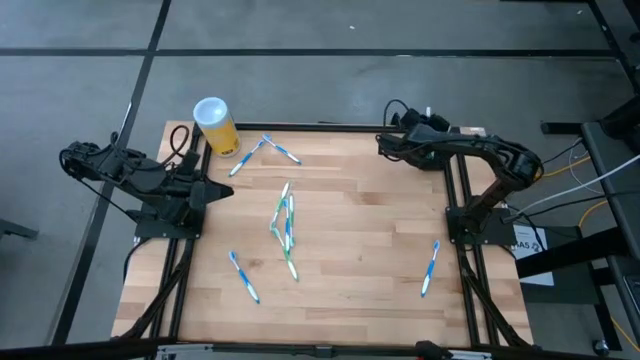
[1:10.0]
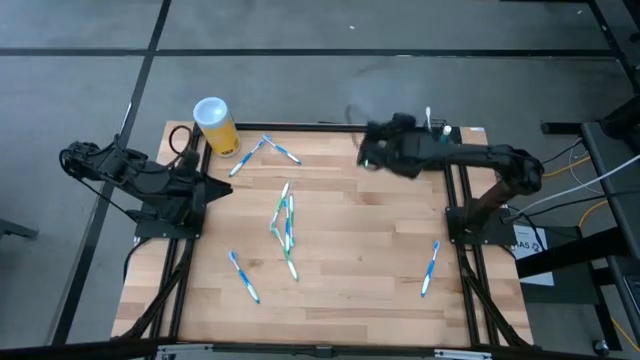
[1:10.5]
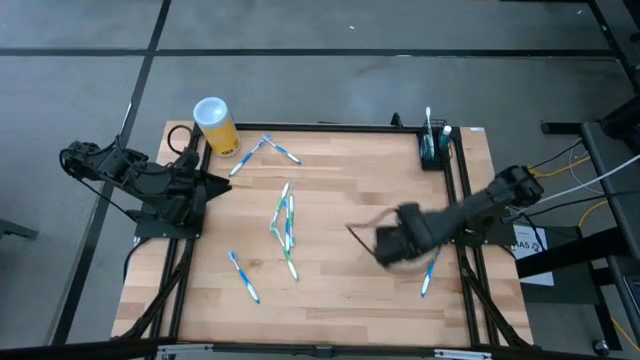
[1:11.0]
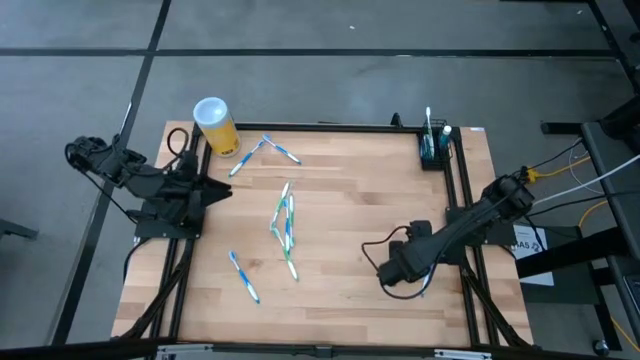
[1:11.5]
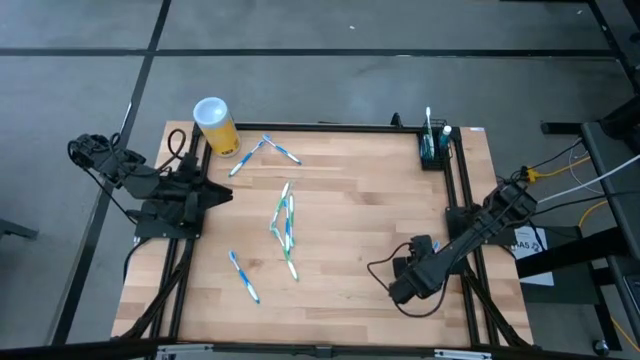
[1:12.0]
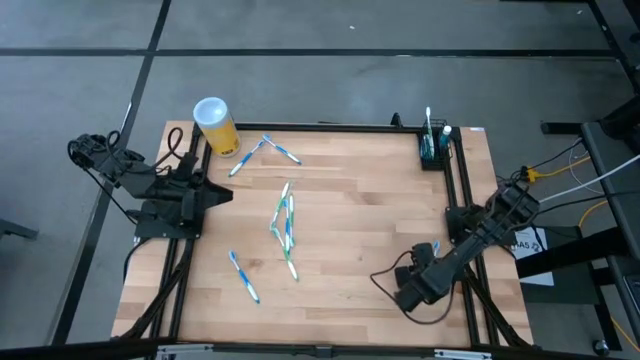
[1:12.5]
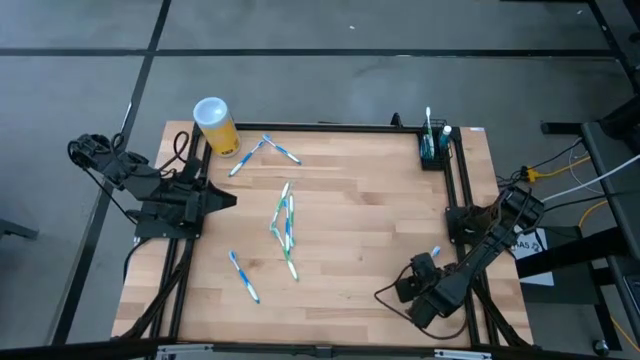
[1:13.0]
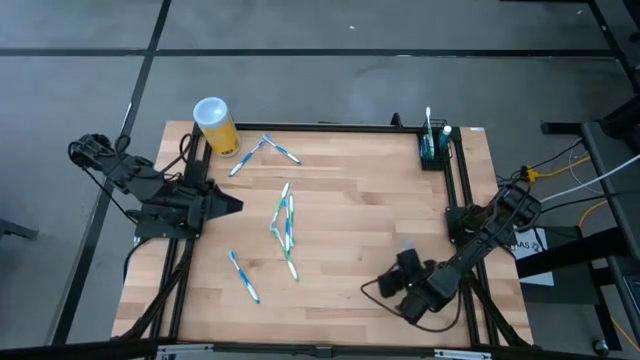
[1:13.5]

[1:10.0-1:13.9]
Task: Pick & Place toothbrushing station
Put the blue toothbrush into the mesh organizer

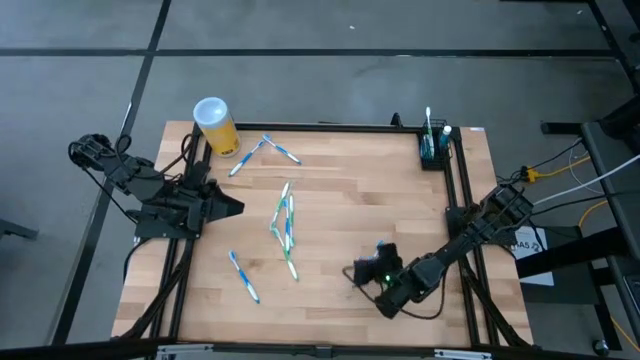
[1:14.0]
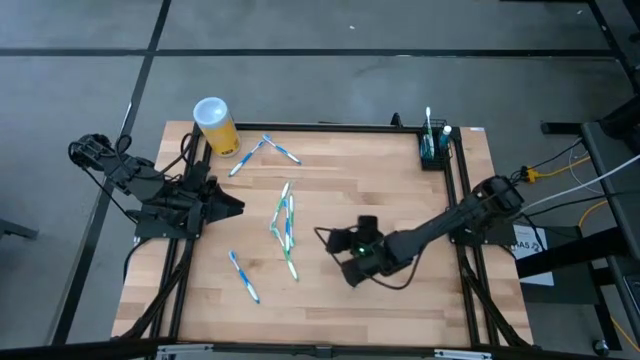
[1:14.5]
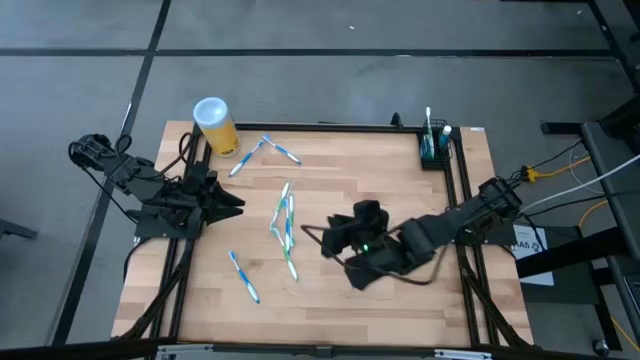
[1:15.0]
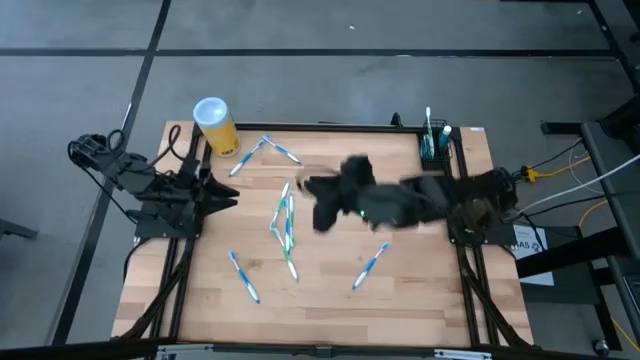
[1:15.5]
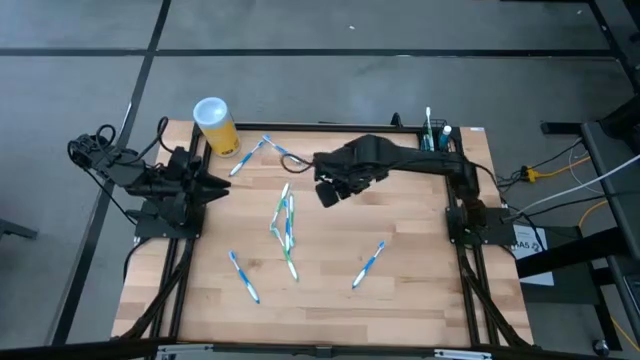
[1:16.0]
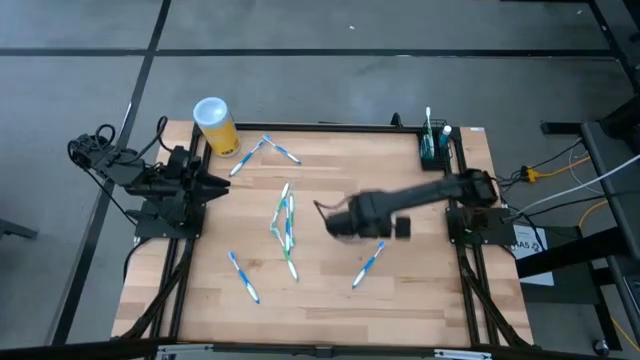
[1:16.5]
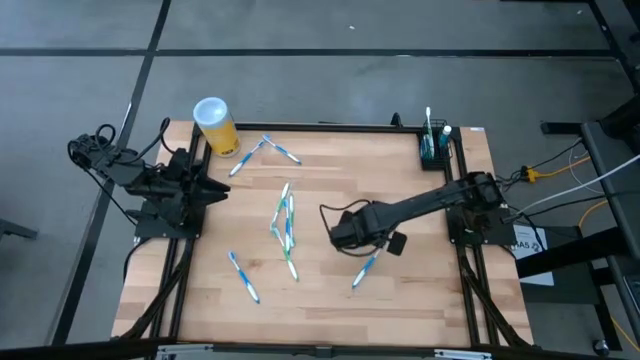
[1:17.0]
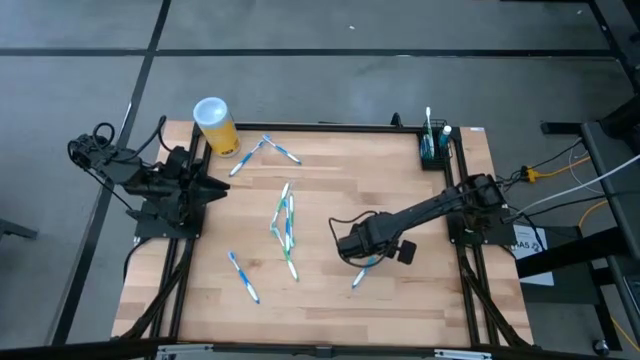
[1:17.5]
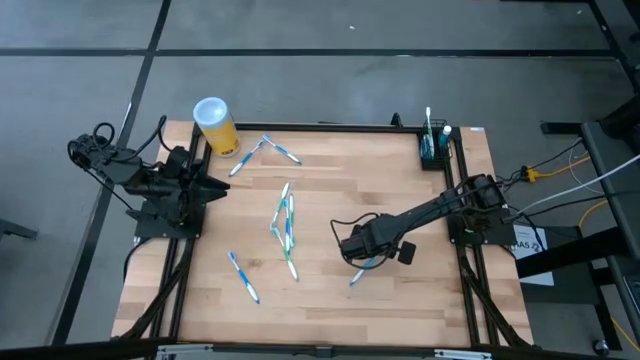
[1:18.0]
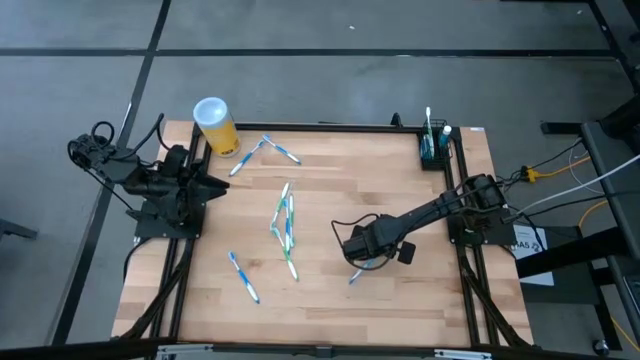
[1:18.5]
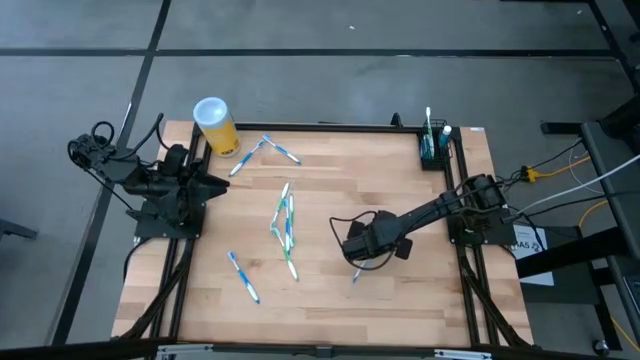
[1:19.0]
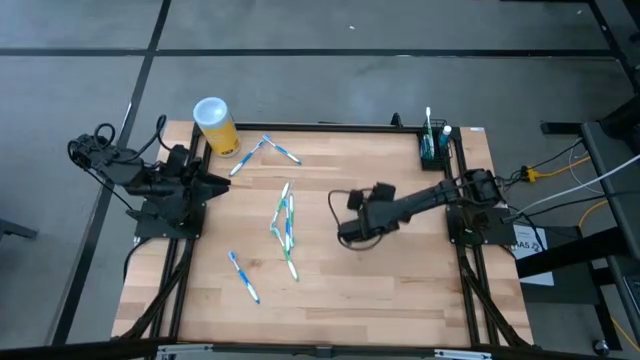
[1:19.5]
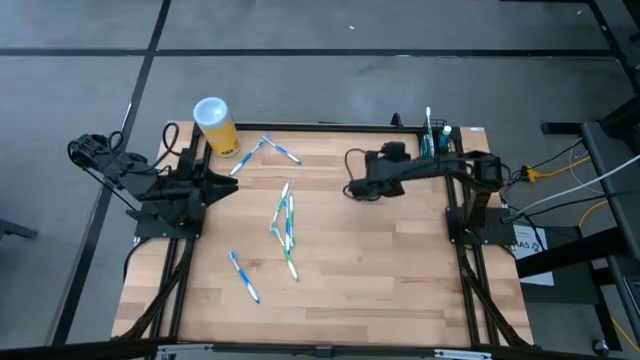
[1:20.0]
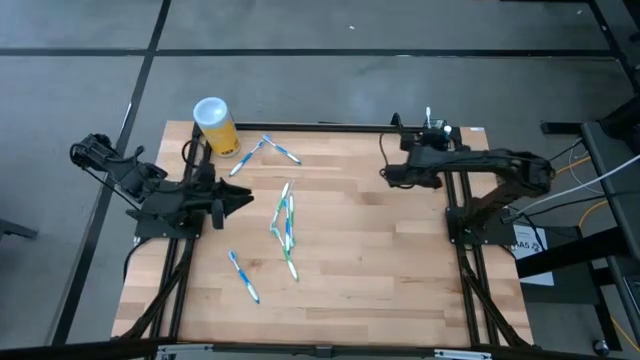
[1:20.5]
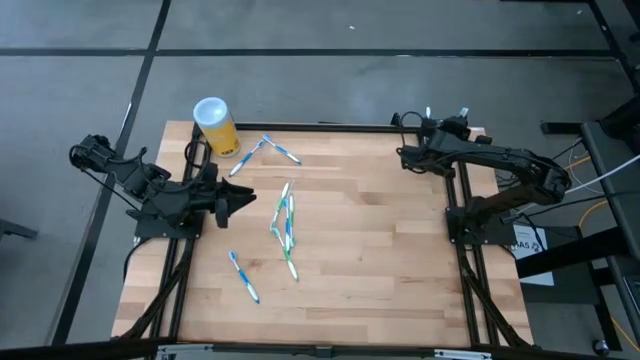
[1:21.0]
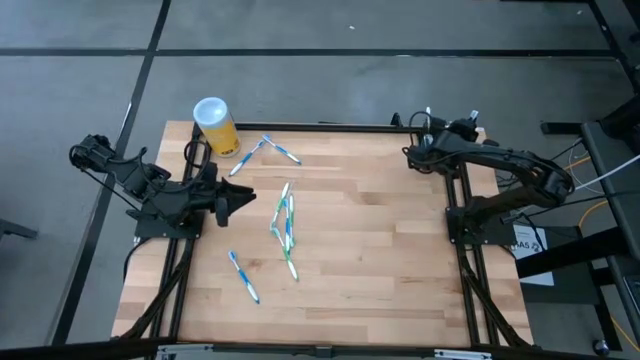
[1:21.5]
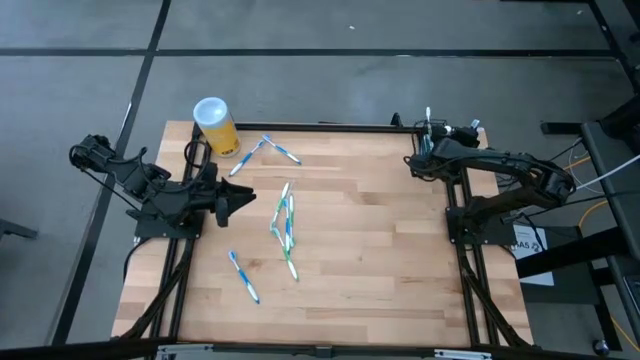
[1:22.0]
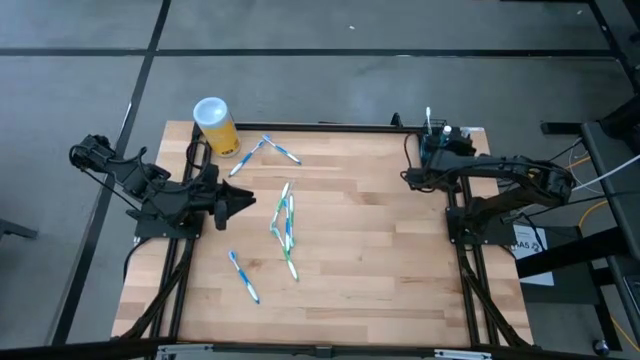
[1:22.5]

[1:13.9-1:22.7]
Put the blue toothbrush into the mesh organizer

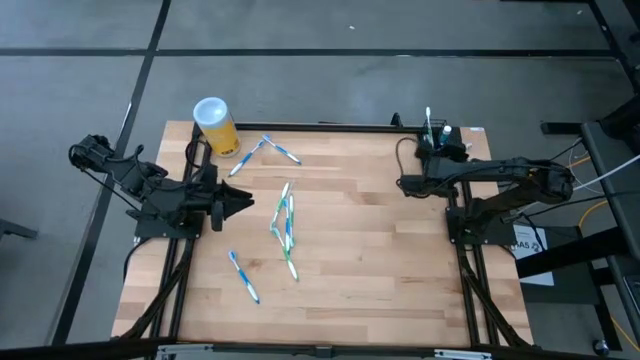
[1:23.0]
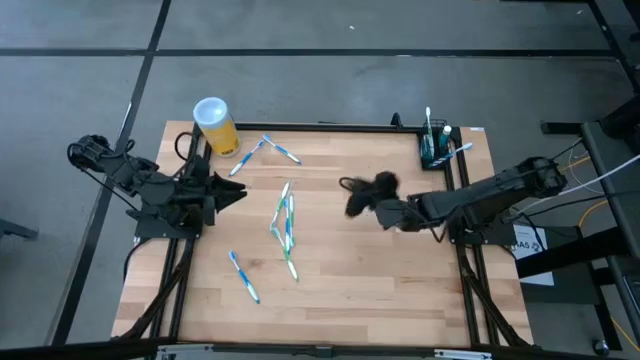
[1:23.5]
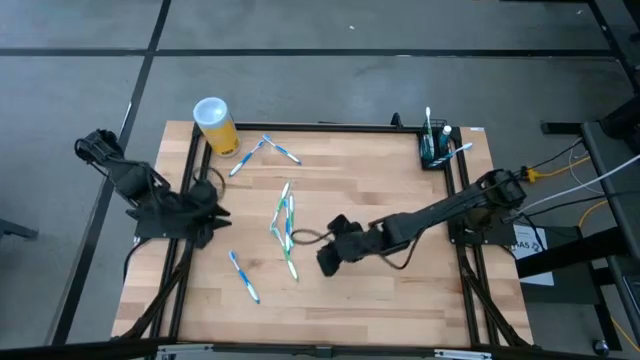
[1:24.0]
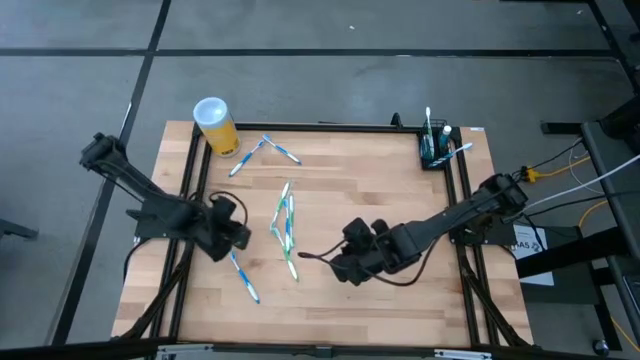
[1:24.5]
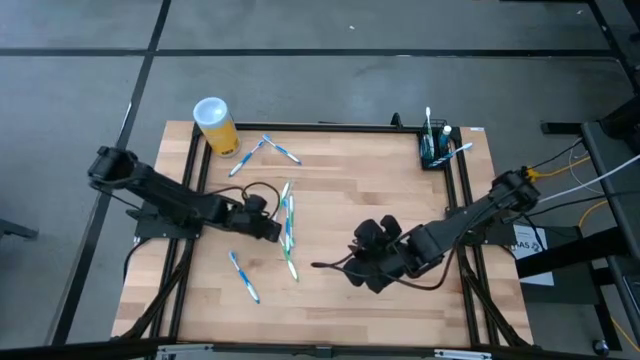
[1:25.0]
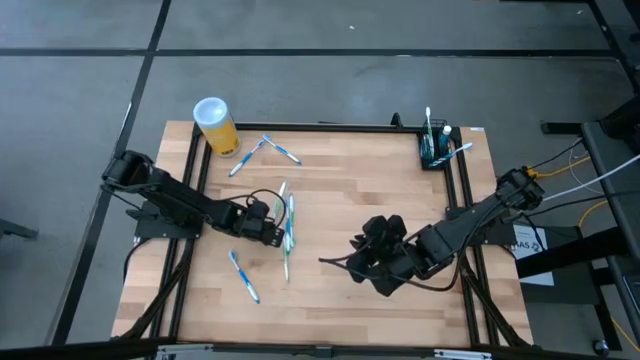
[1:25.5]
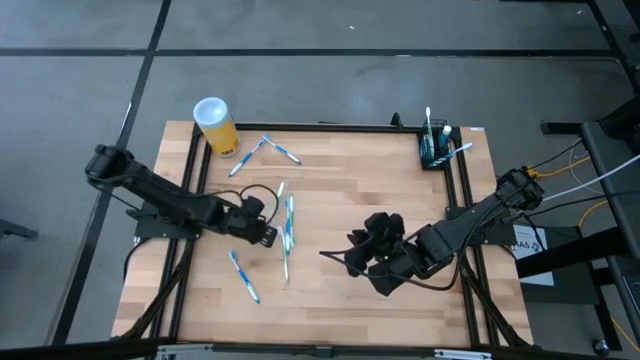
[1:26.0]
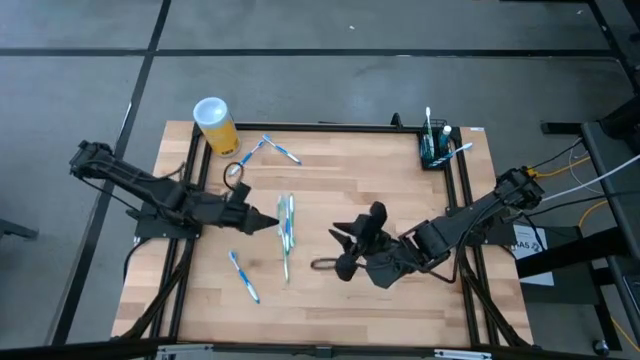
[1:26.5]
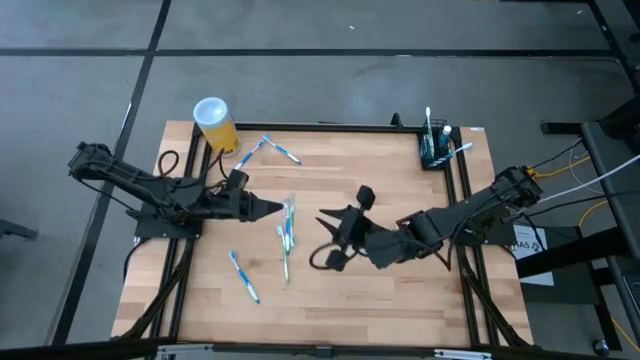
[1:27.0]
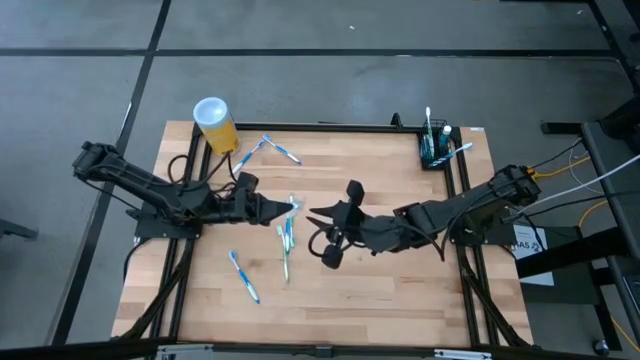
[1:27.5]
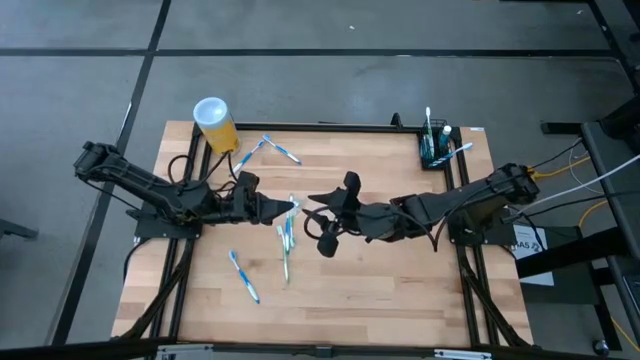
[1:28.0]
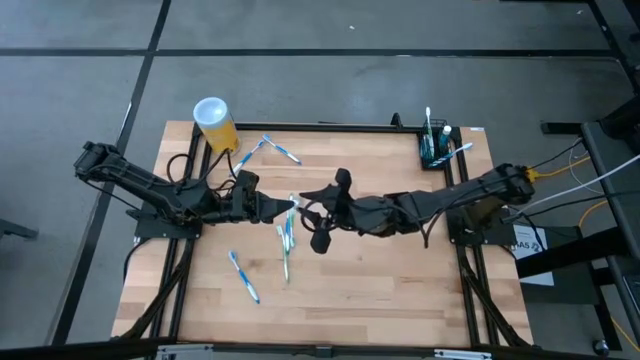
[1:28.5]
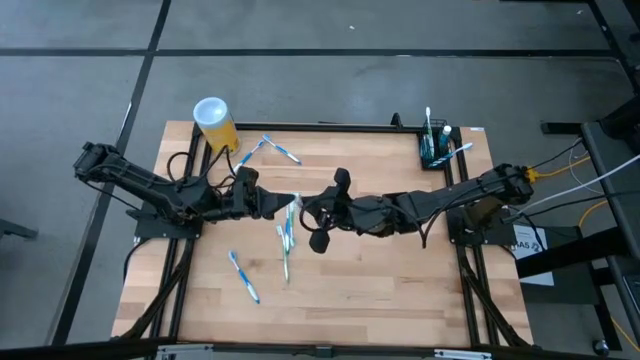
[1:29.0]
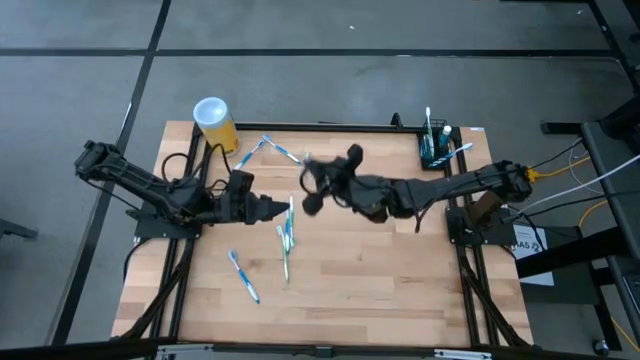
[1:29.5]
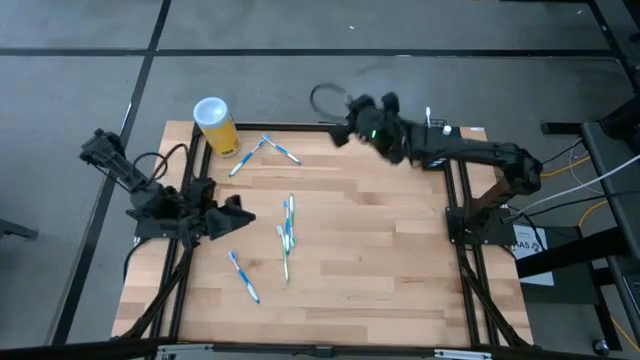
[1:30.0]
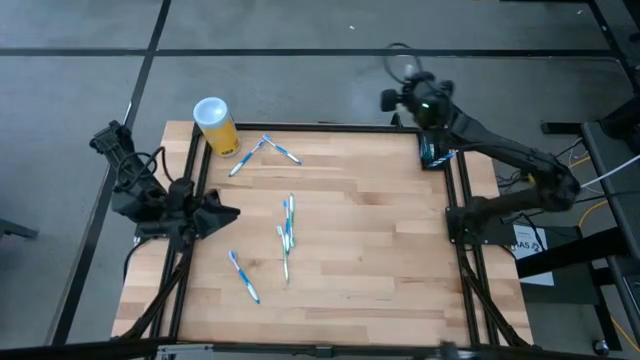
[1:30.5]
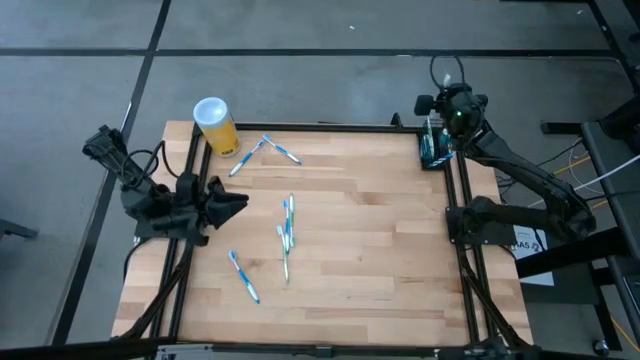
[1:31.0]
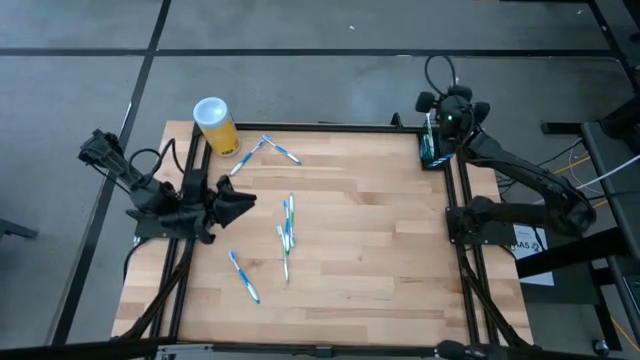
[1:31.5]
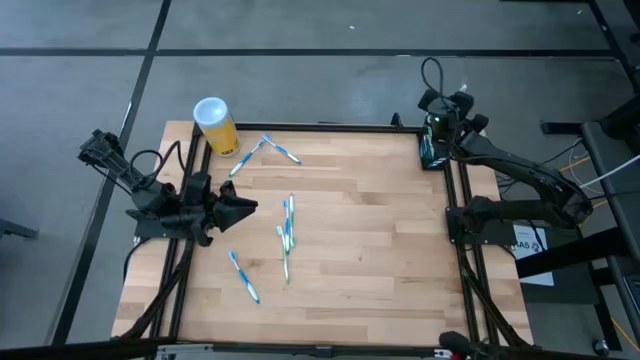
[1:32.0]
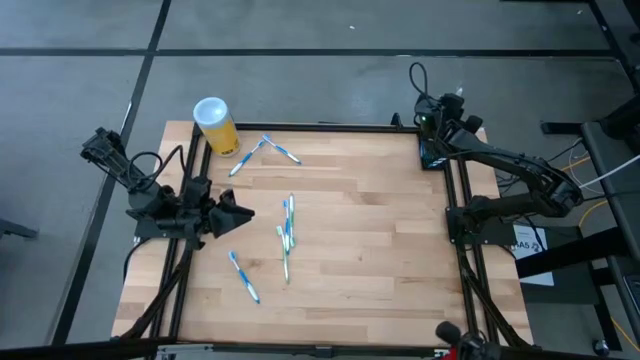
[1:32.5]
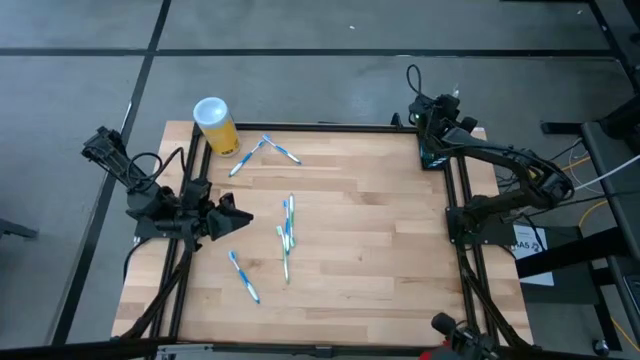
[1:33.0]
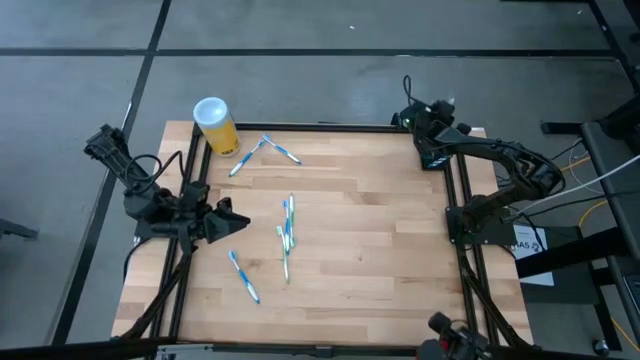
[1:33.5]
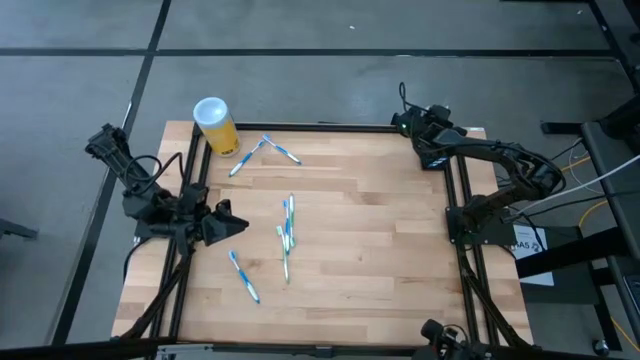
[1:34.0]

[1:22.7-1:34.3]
Put the green toothbrush into the mesh organizer
